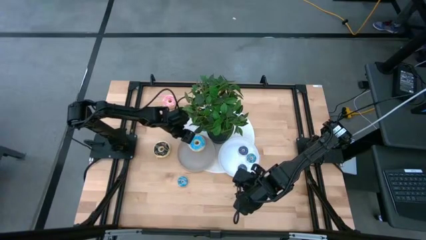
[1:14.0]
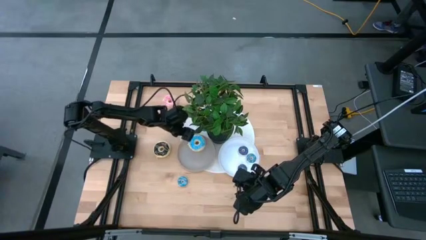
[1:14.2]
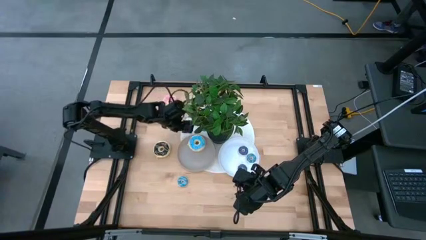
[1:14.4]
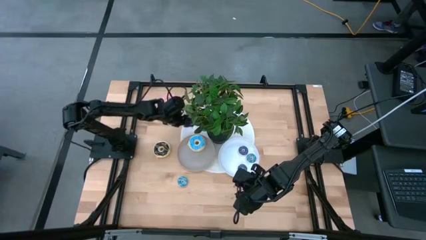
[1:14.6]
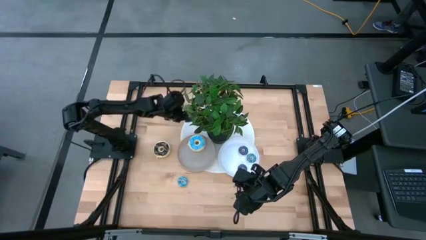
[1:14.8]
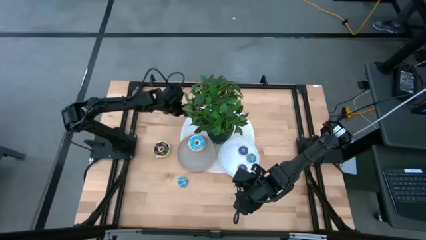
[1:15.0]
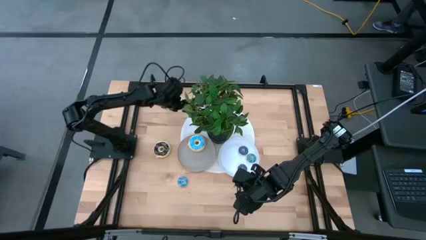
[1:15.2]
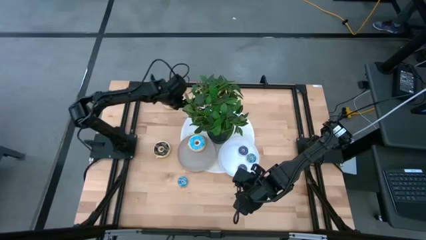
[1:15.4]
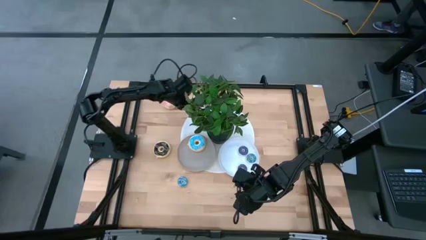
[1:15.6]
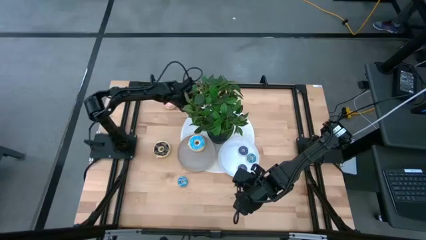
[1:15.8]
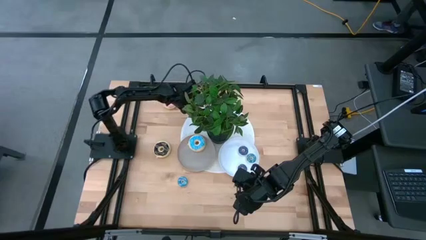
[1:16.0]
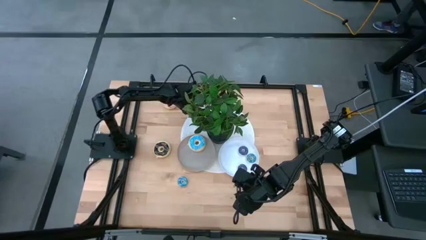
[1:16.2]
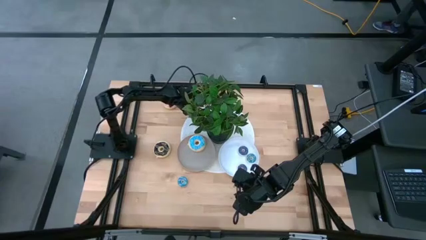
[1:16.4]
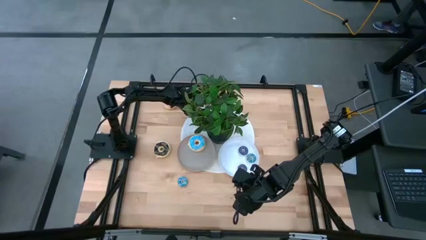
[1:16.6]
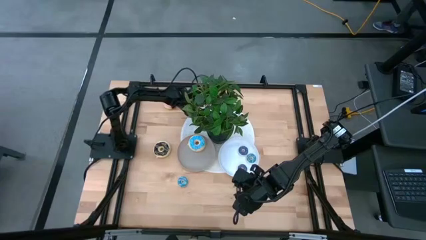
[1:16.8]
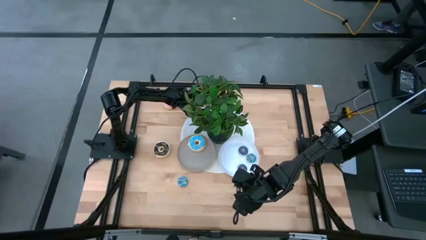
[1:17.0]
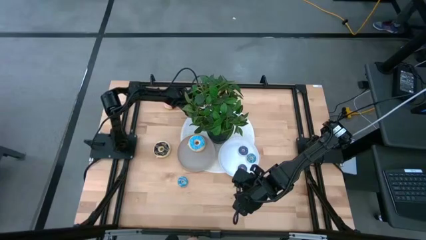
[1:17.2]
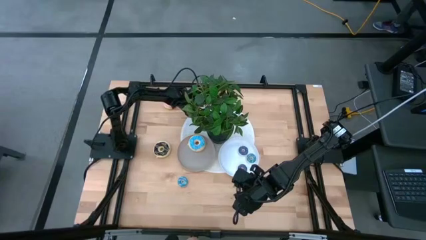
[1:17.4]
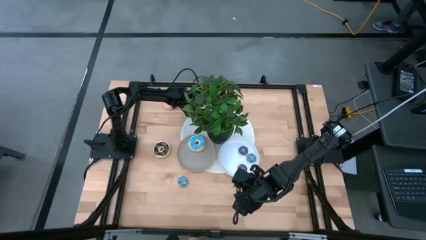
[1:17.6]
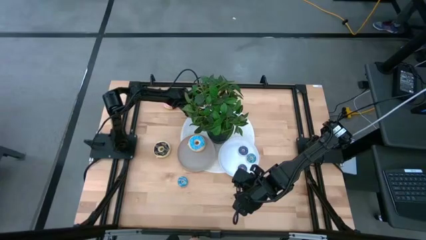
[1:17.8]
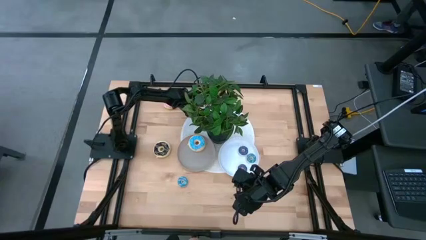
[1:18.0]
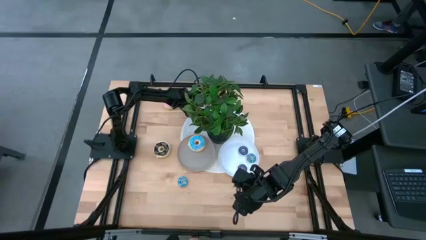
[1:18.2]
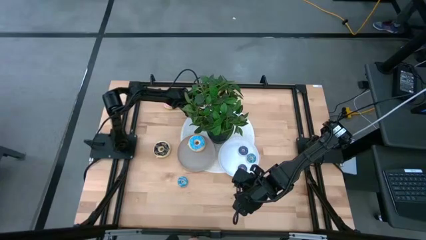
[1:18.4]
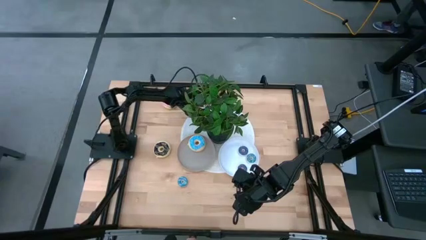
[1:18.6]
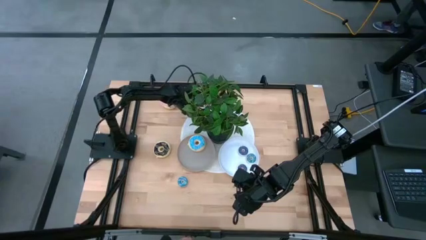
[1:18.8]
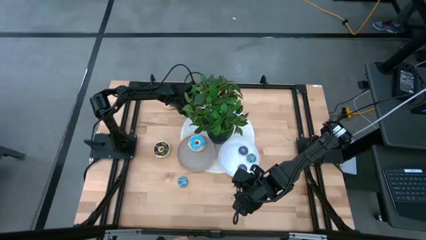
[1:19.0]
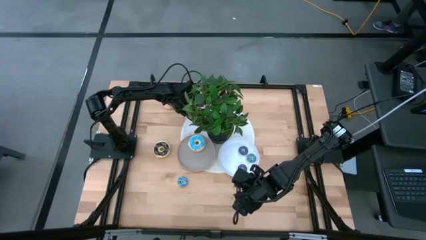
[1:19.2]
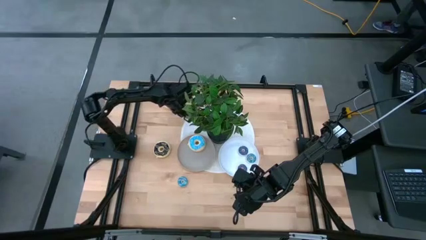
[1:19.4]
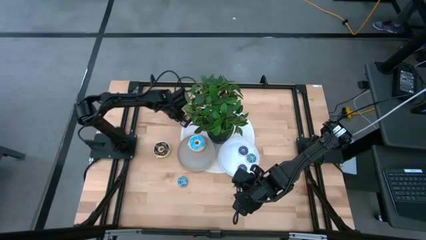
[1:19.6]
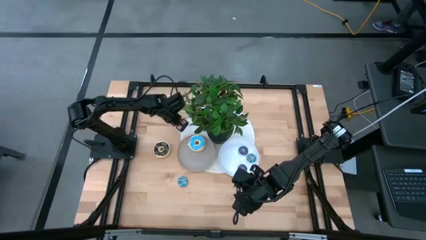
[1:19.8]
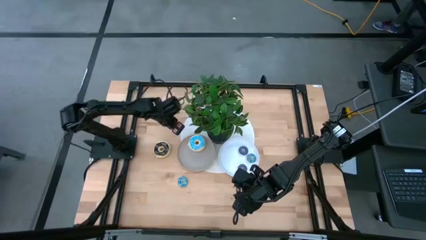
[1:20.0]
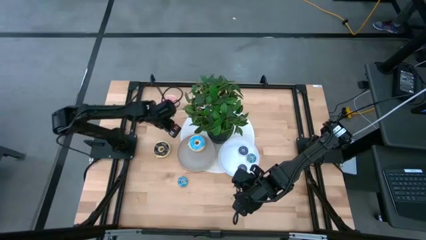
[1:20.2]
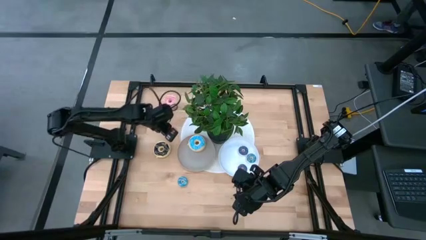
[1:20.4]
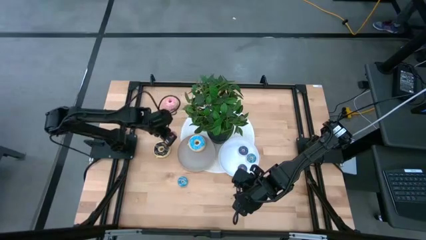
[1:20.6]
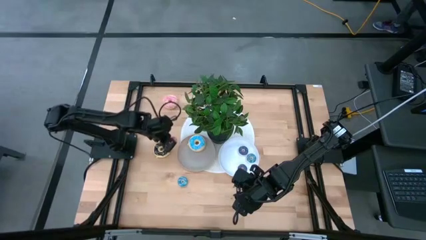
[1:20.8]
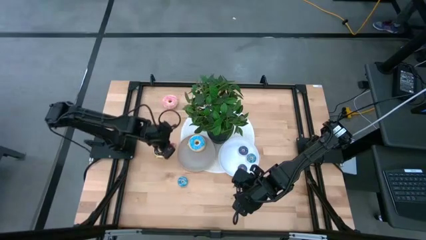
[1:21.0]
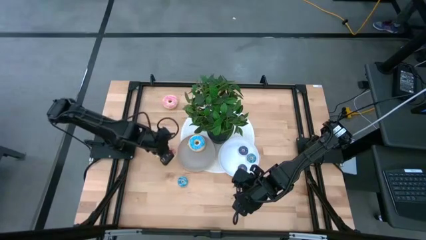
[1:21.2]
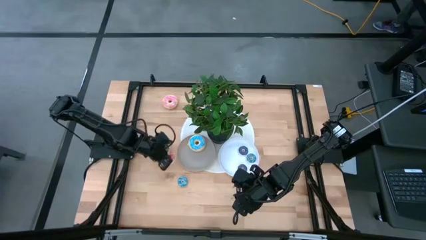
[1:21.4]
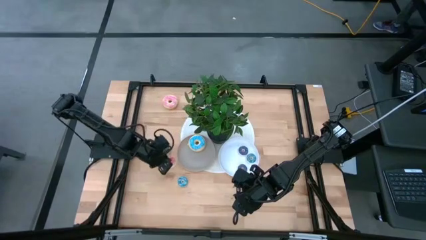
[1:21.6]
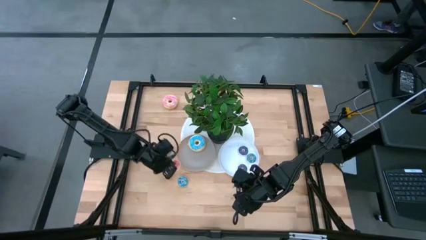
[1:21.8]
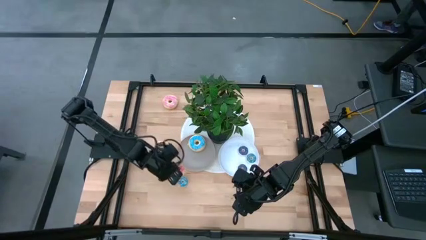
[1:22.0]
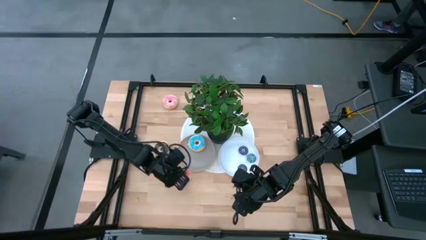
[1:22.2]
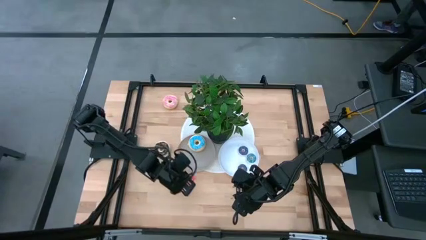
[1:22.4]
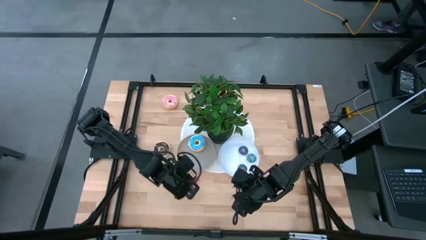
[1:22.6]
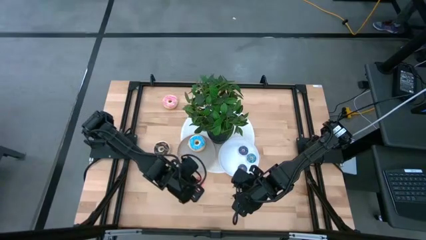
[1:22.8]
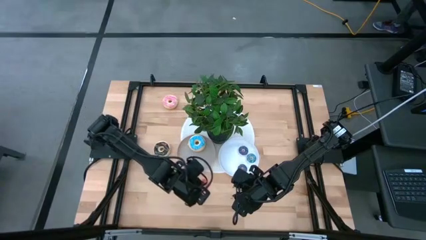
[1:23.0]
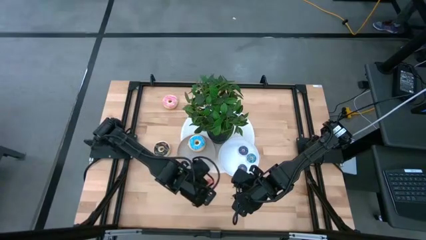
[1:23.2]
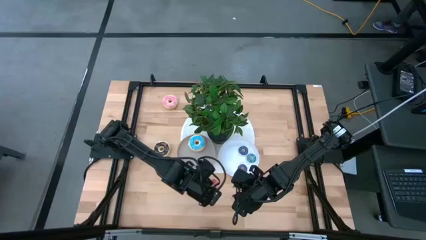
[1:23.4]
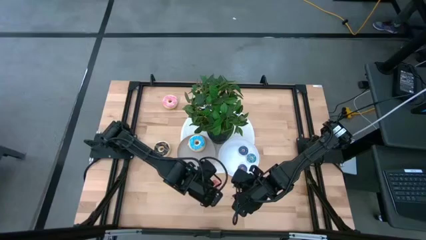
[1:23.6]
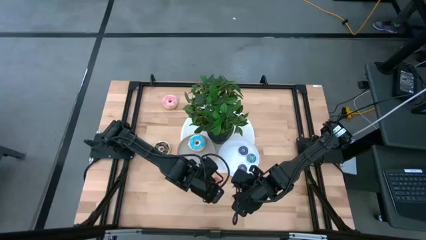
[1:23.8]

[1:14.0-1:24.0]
Task: Pick & Place donuts
Put the small pink donut on the white plate

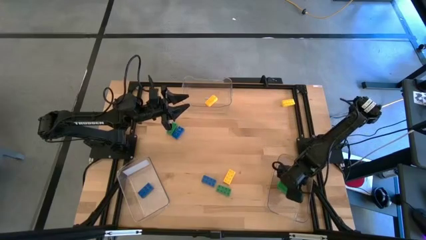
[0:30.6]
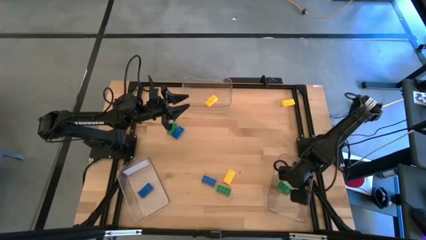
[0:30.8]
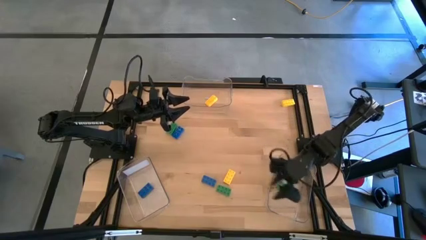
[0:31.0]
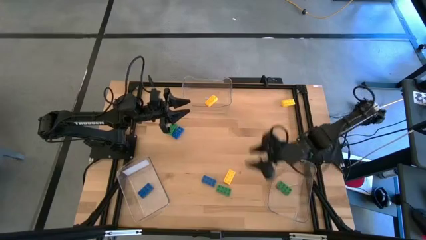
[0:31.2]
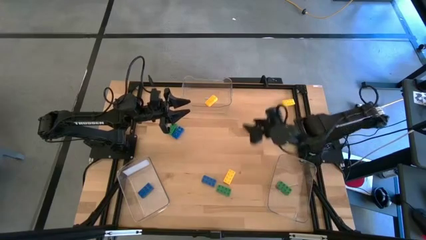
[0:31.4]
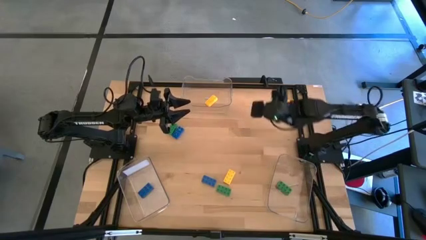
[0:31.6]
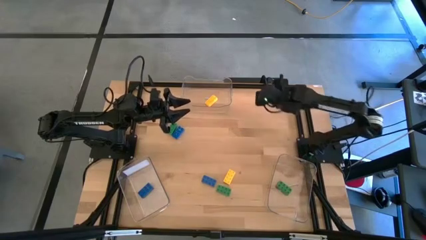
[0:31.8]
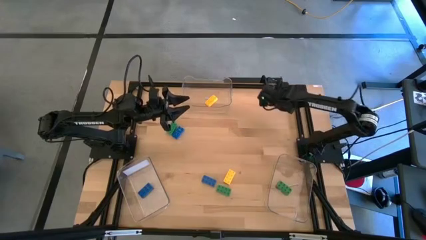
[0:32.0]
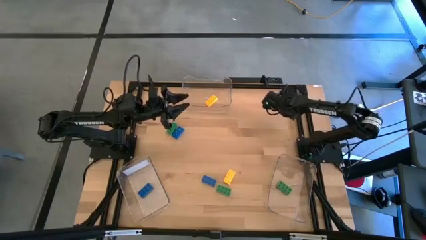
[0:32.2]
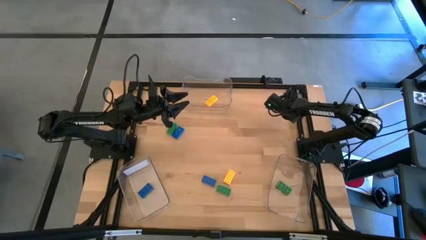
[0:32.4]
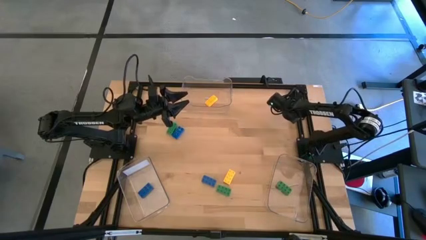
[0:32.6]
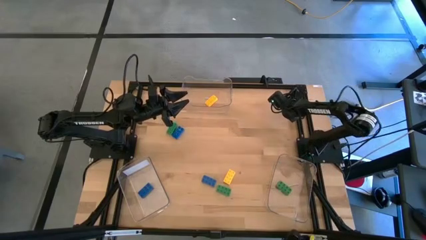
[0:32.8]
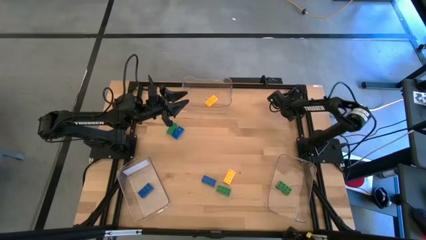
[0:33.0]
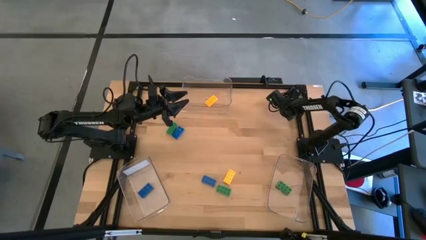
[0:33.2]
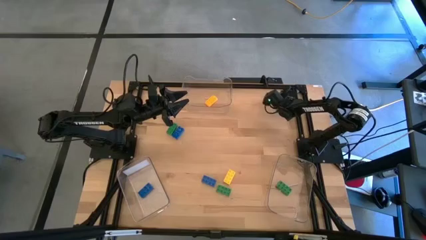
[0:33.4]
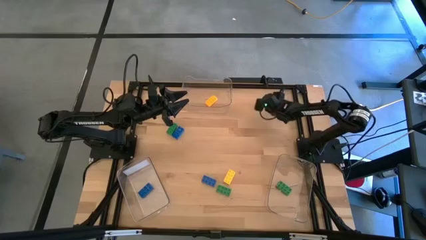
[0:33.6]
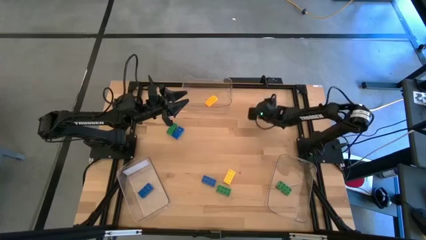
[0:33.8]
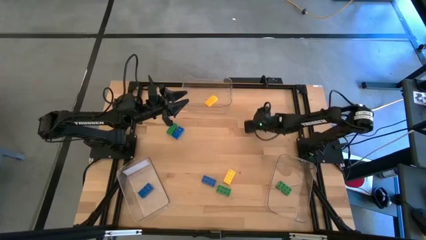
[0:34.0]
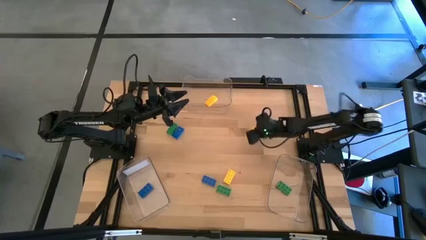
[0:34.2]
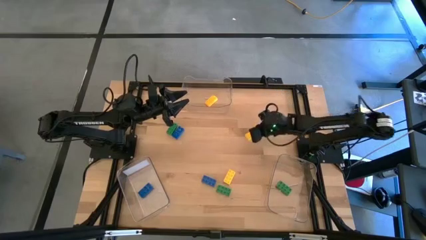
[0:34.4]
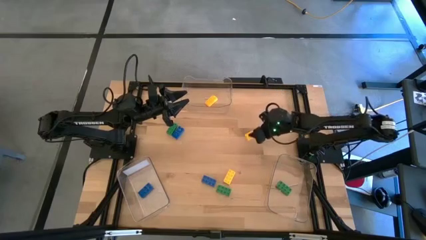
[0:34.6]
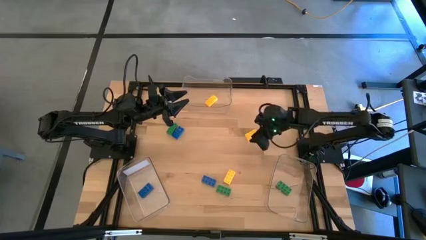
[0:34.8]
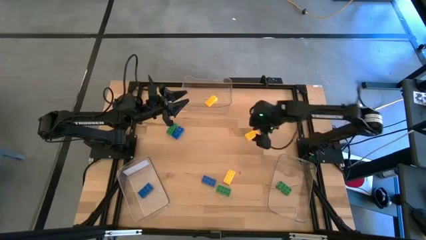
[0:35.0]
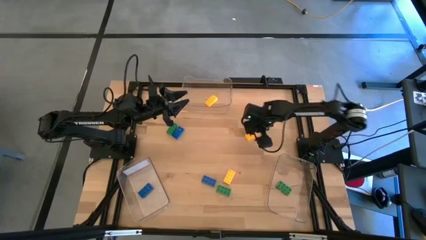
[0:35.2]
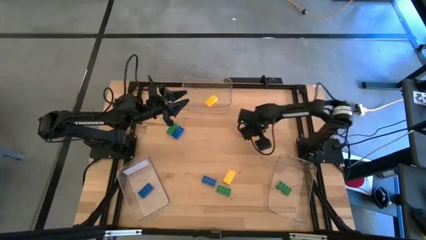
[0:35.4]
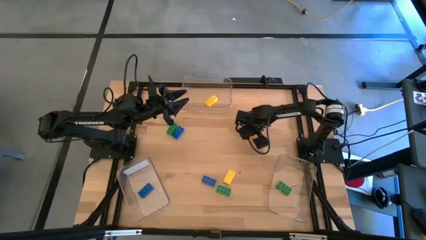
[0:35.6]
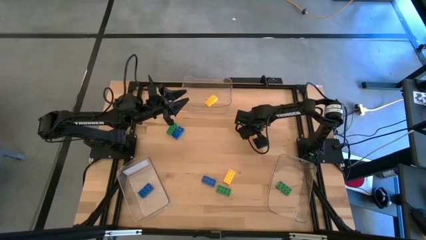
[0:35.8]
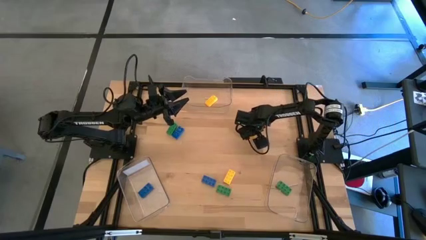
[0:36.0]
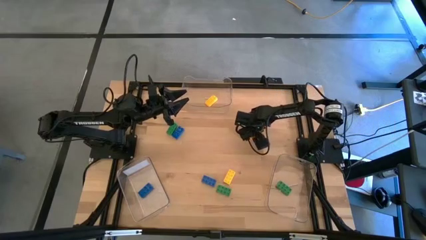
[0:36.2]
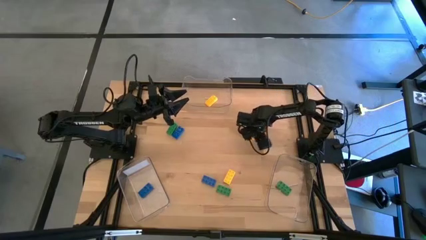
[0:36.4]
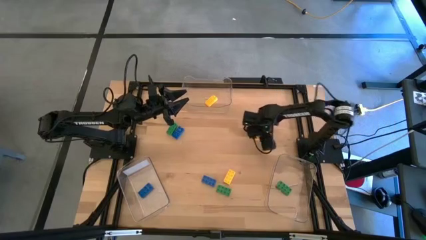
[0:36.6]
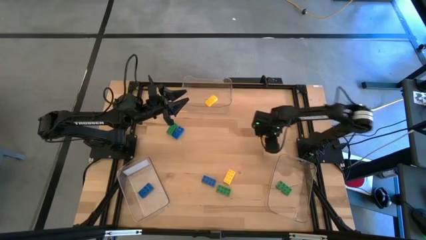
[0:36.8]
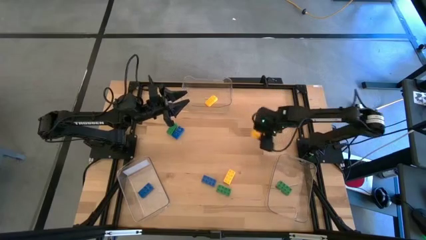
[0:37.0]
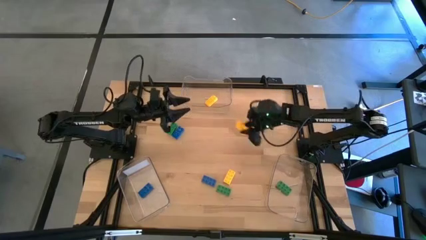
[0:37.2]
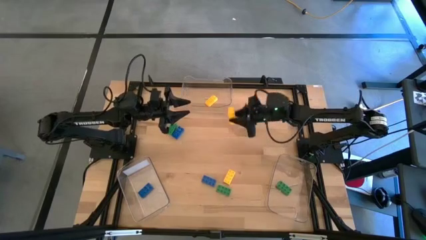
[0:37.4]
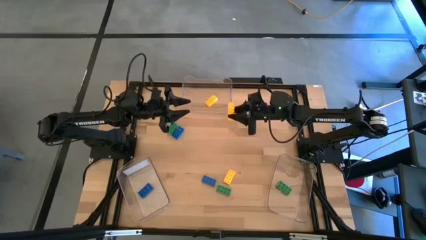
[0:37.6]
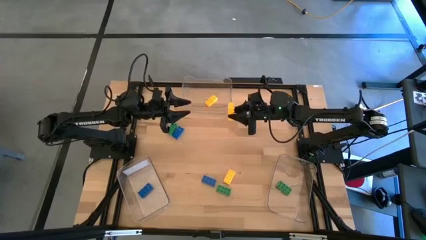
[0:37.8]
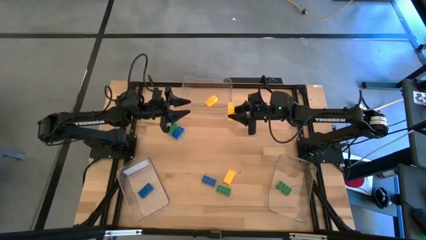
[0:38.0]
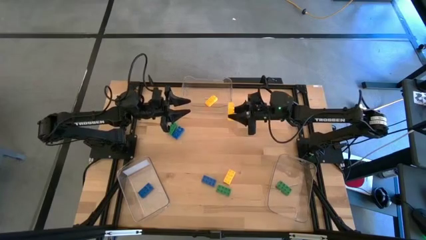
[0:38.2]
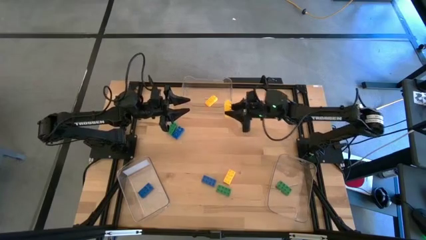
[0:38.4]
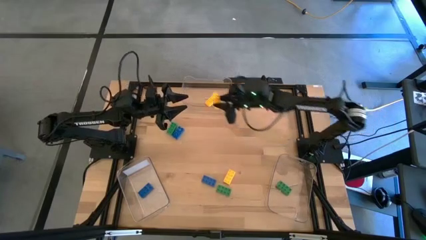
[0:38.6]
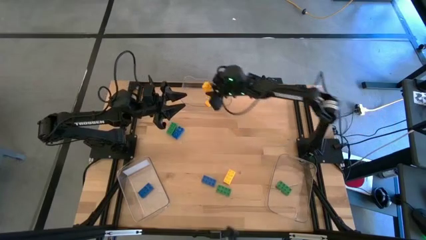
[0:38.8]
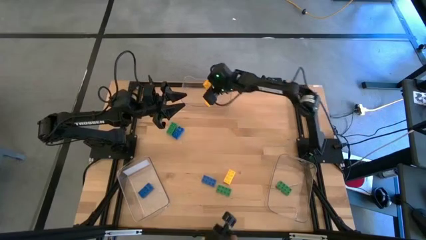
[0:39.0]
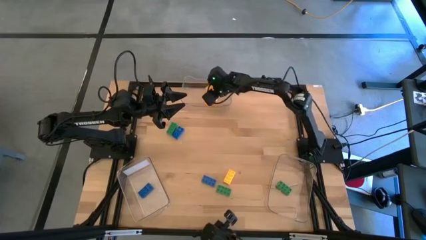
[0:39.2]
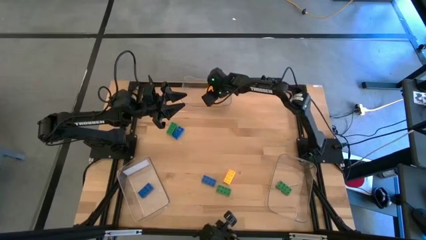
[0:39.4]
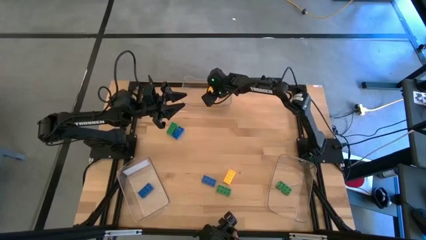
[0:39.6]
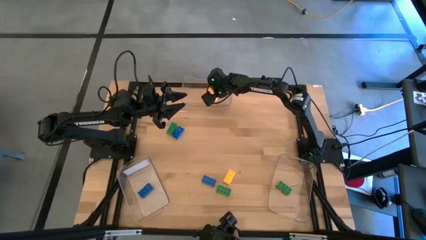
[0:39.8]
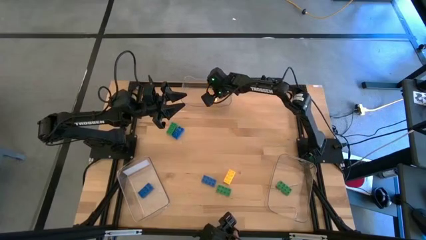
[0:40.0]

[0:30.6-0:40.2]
Task: Sort & place blocks by color
Put the top yellow game piece into the top transparent bin
